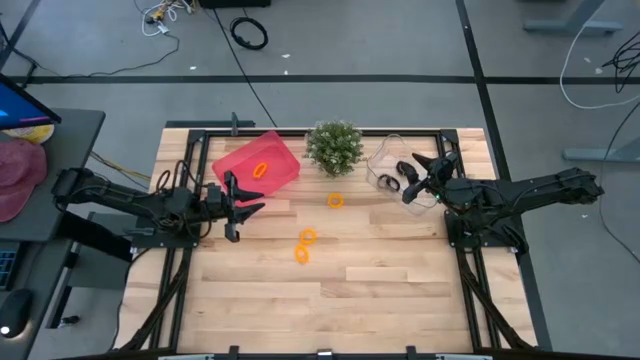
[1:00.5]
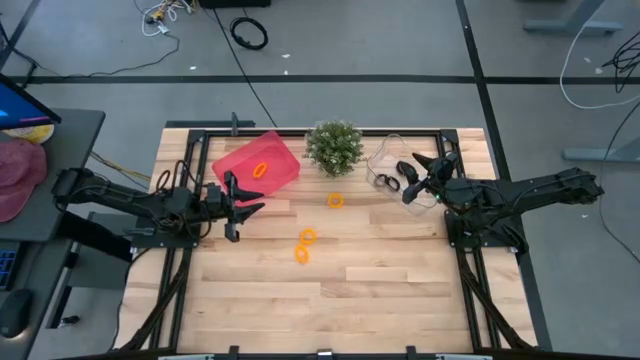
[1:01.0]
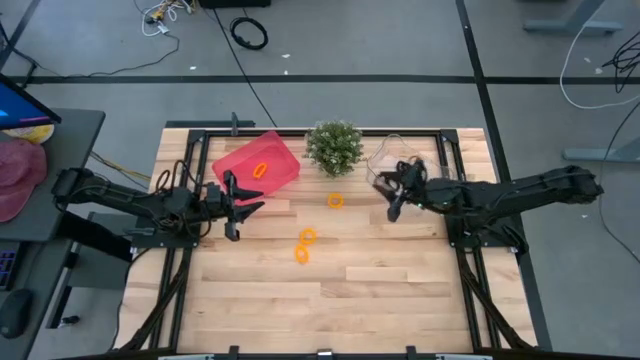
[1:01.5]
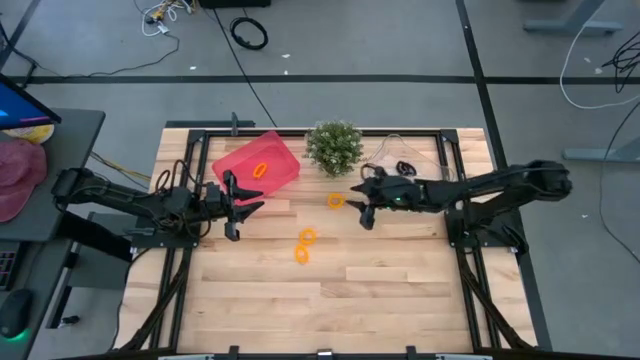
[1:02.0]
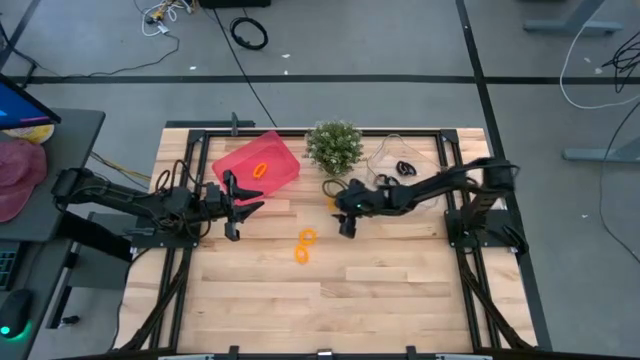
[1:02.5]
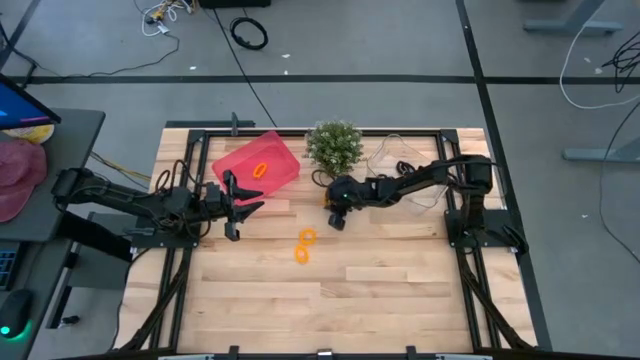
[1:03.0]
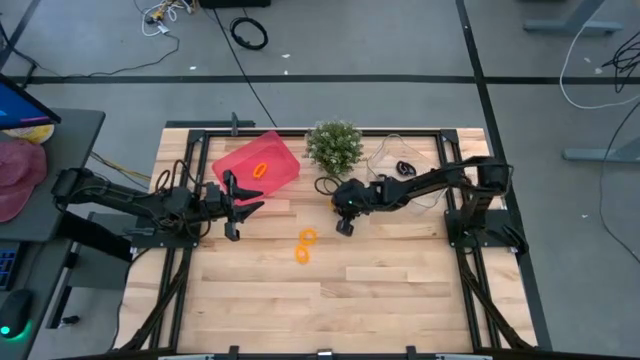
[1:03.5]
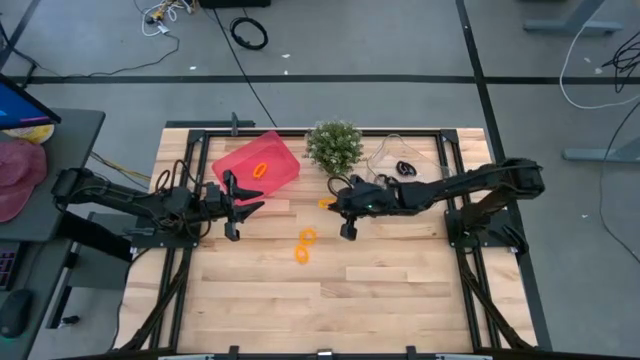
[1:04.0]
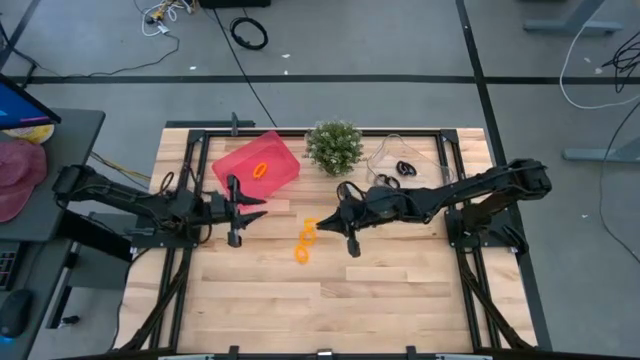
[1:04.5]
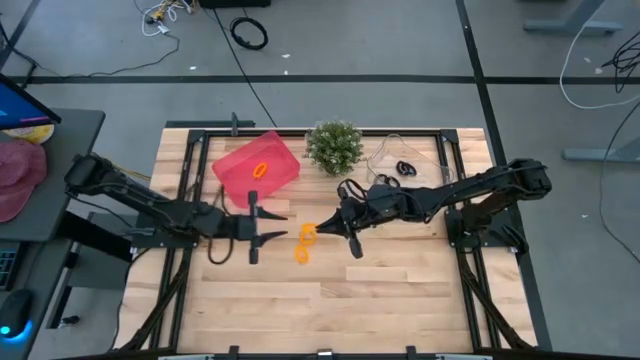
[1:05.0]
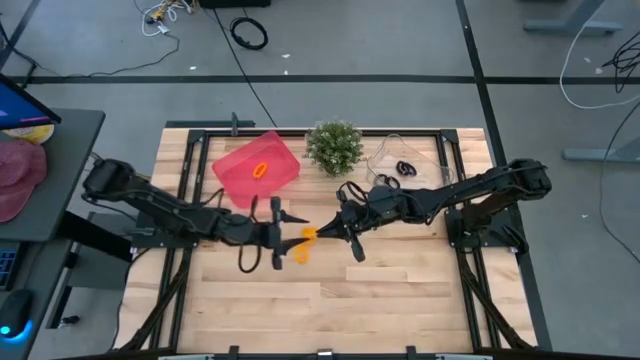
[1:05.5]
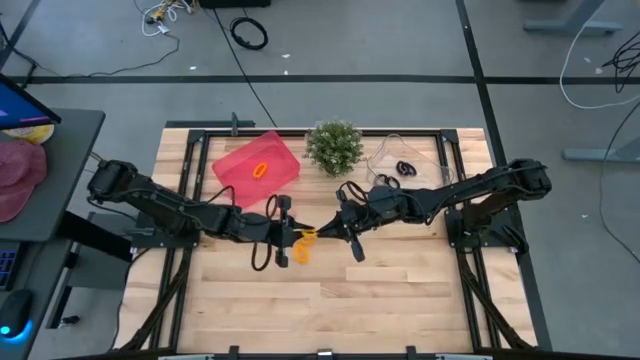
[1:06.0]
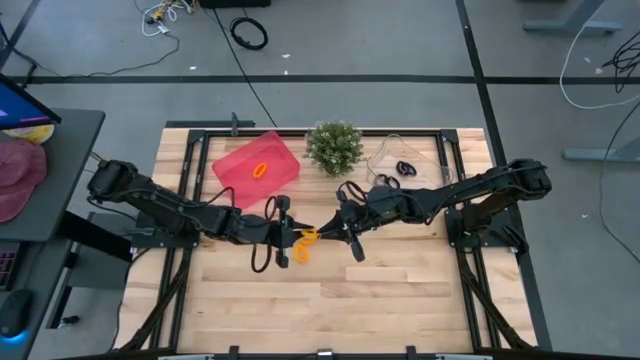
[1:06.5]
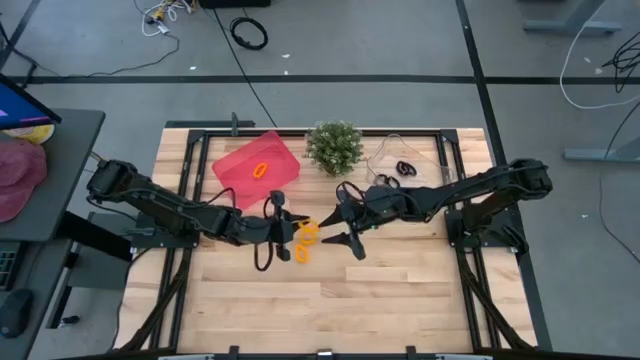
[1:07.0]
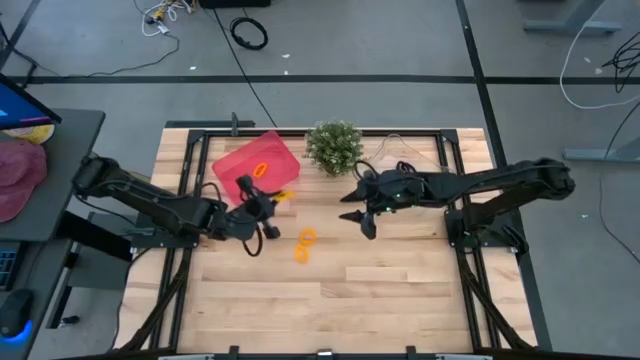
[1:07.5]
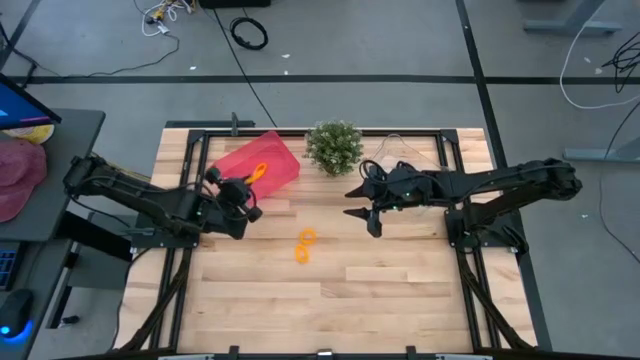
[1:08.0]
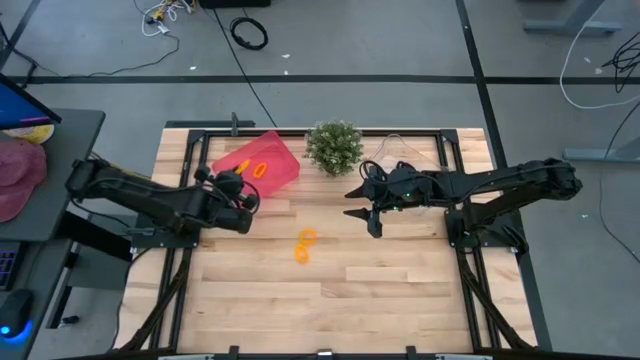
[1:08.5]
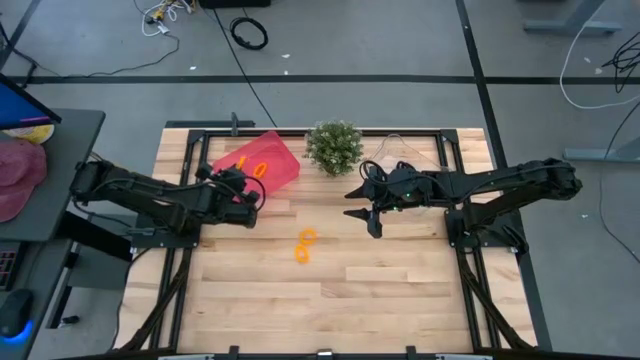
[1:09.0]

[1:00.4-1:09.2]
Task: Sort spring keychains
Put the yellow spring keychain into the pink bin

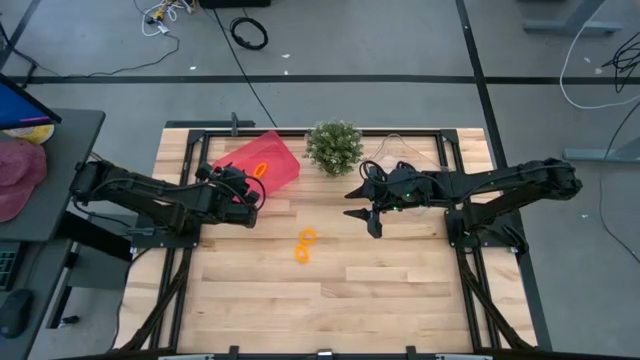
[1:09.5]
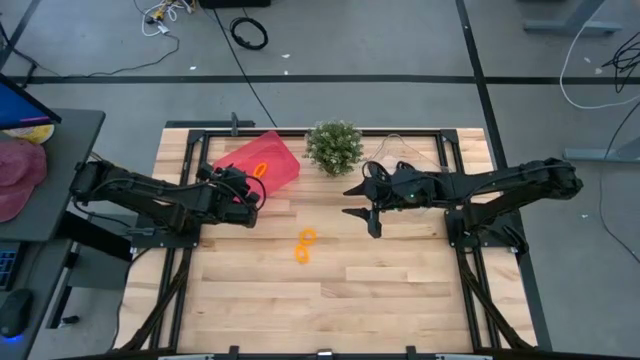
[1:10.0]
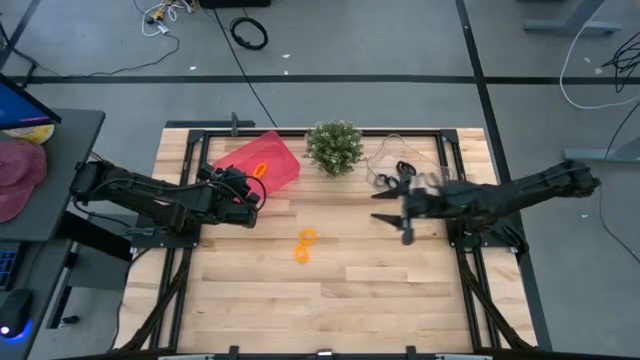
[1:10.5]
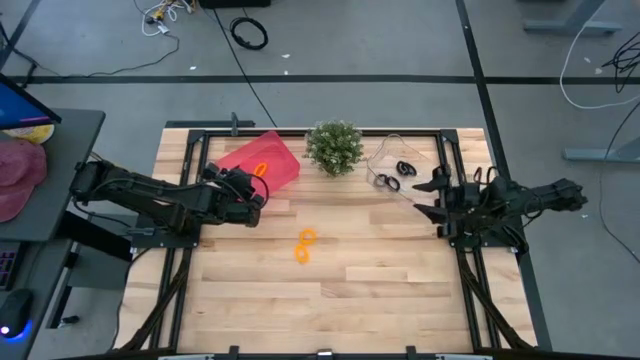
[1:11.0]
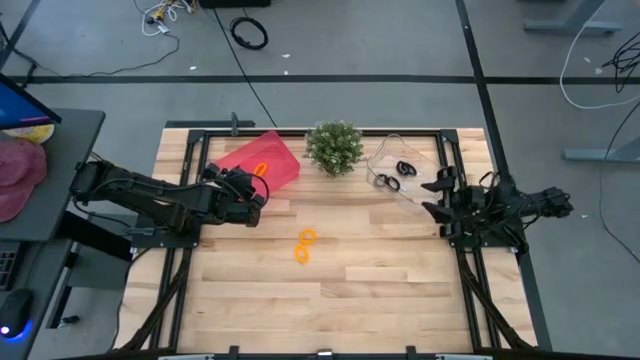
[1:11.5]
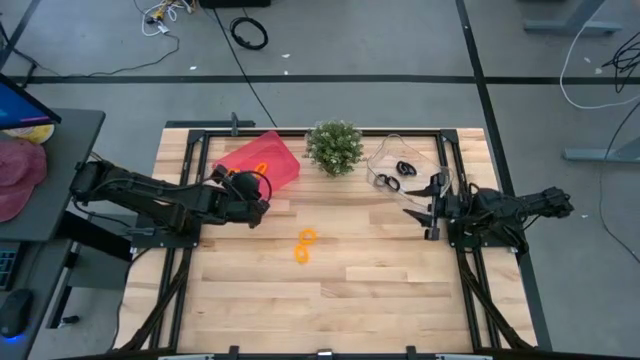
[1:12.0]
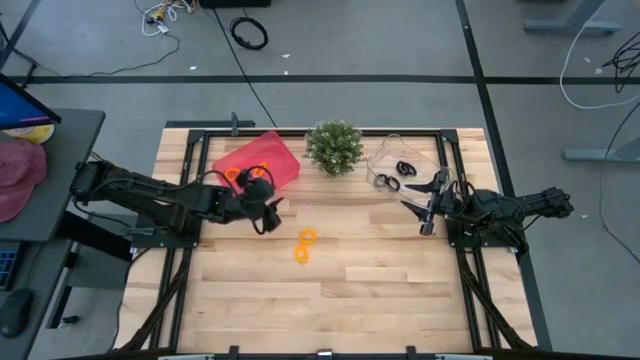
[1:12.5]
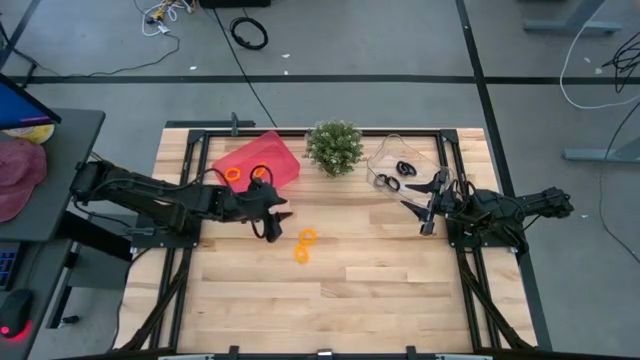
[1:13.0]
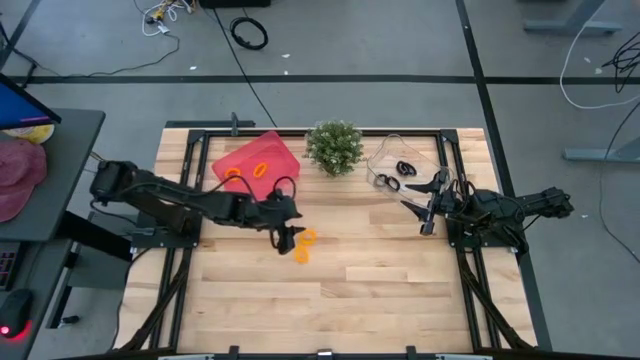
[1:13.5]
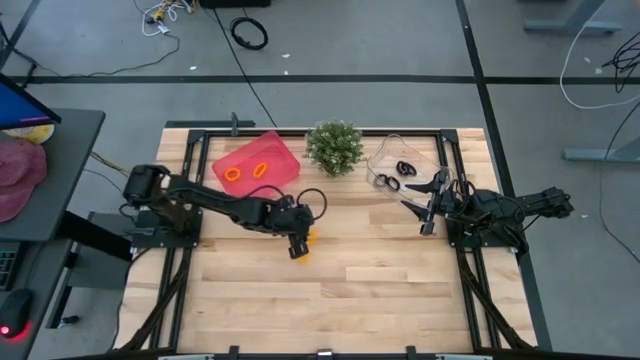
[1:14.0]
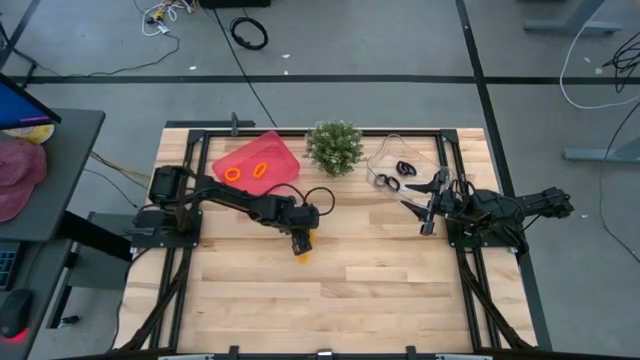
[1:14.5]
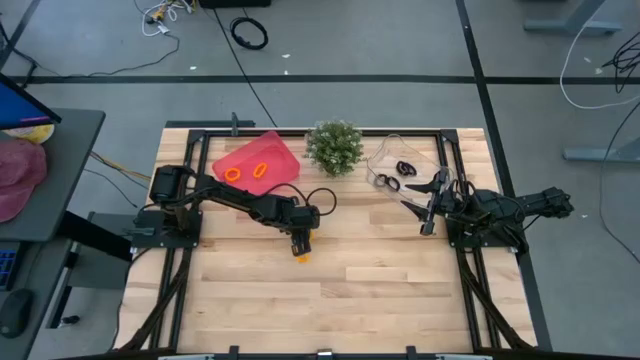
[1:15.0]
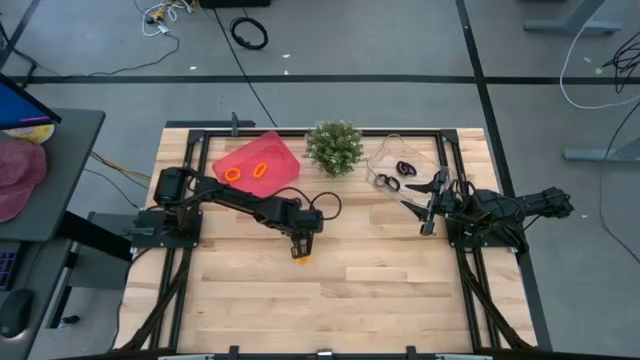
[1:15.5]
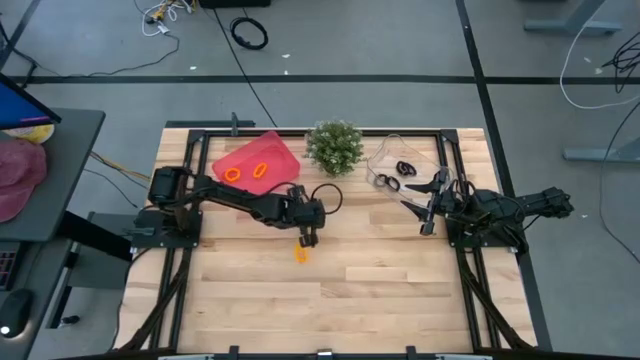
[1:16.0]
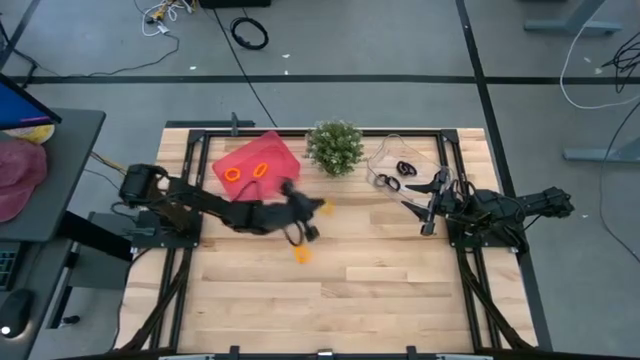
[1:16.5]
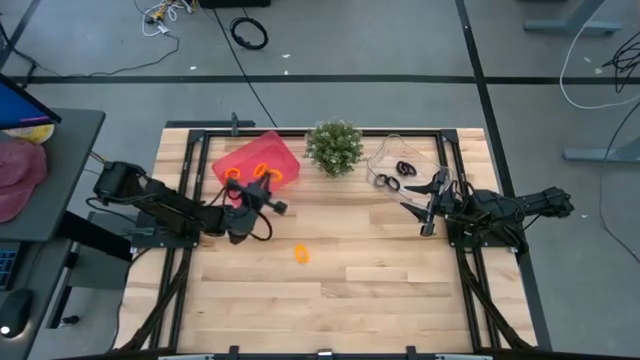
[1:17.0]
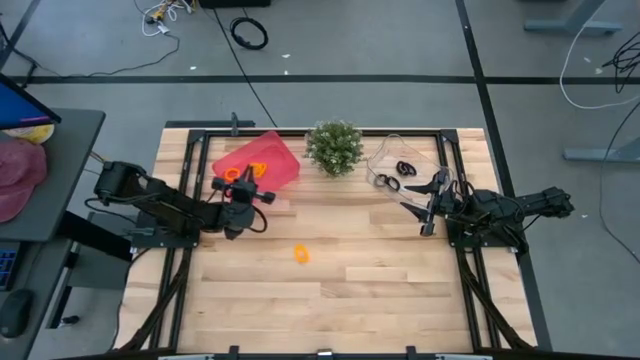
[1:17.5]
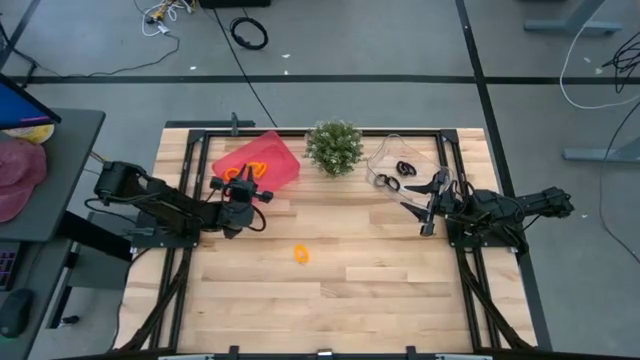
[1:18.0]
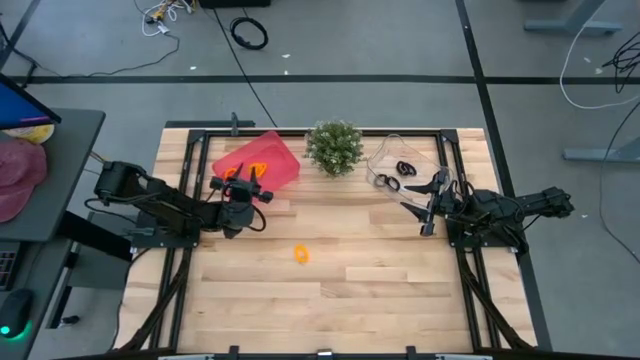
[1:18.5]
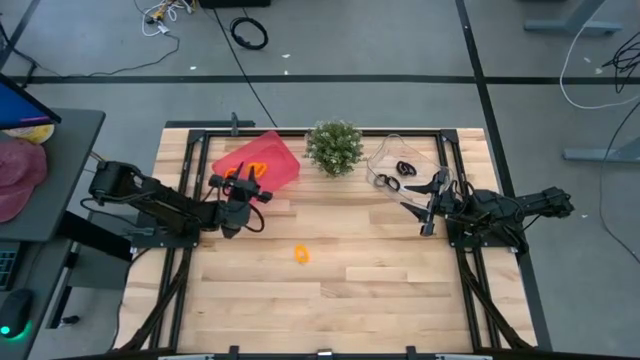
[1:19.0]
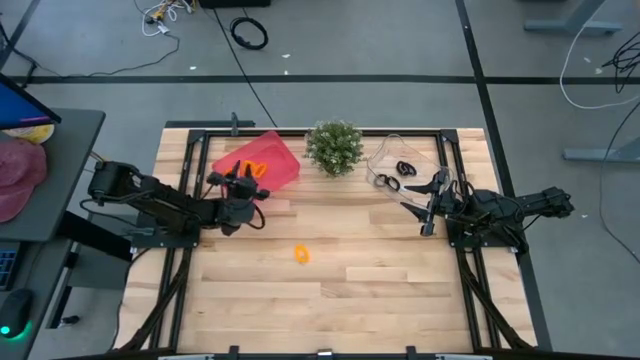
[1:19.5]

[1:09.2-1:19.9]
Put the yellow spring keychain into the pink bin

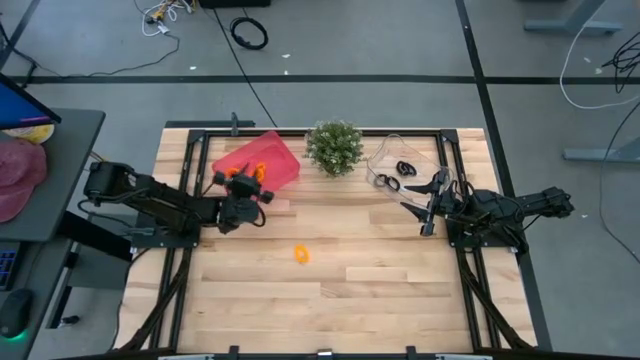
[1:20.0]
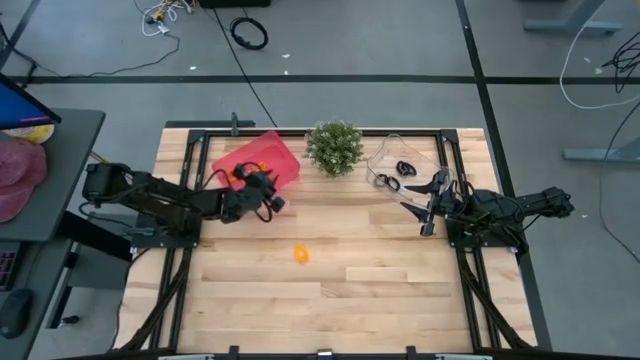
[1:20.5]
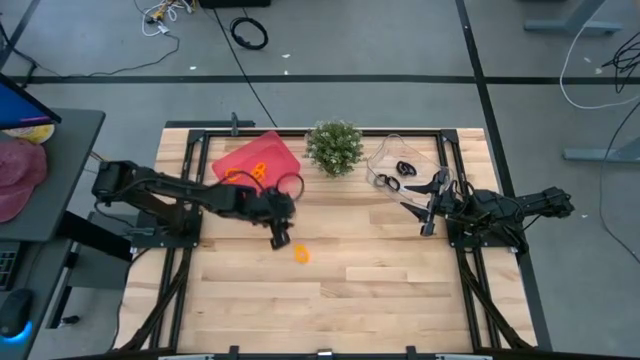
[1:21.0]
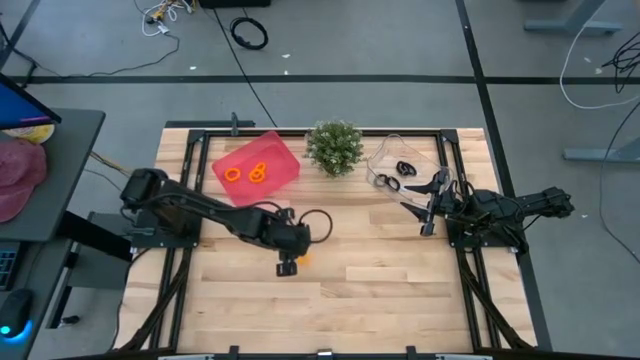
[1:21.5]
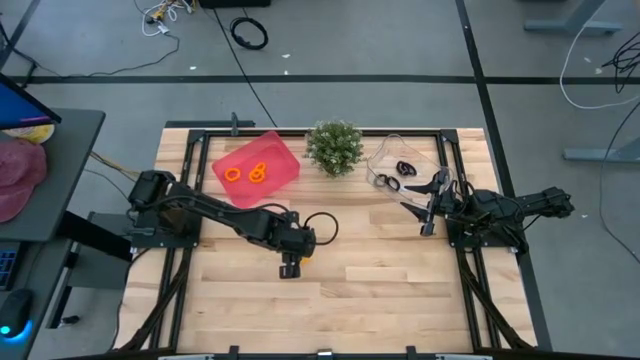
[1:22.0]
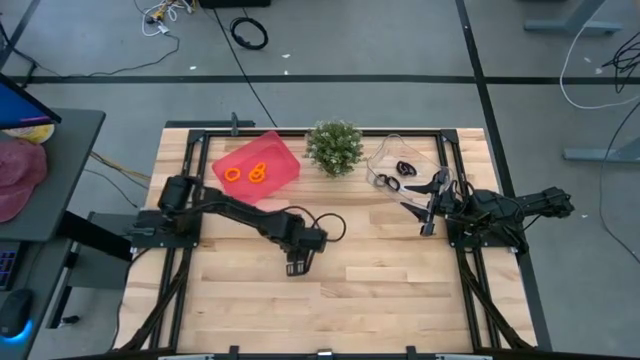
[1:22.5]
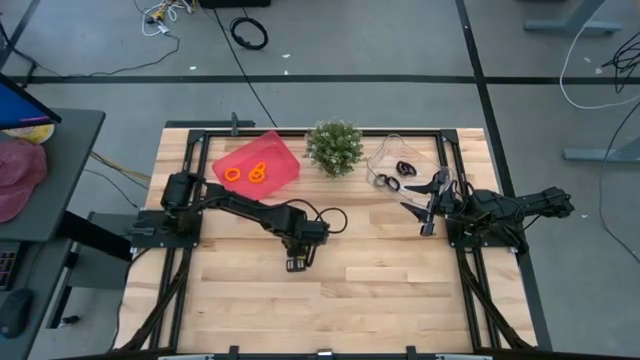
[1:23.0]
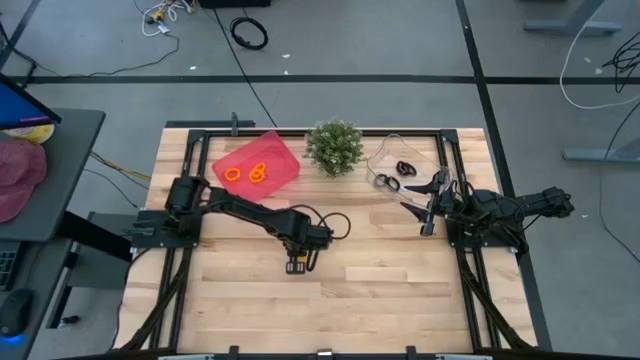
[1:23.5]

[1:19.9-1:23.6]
Put the yellow spring keychain into the pink bin
